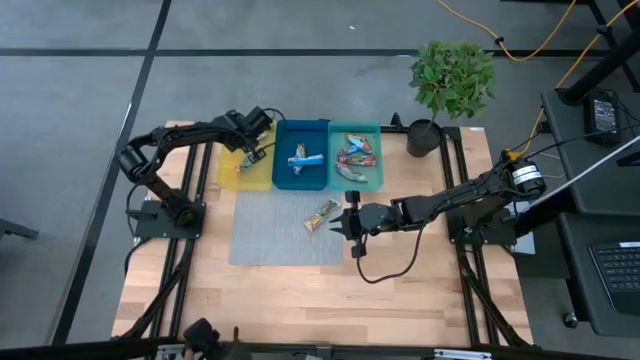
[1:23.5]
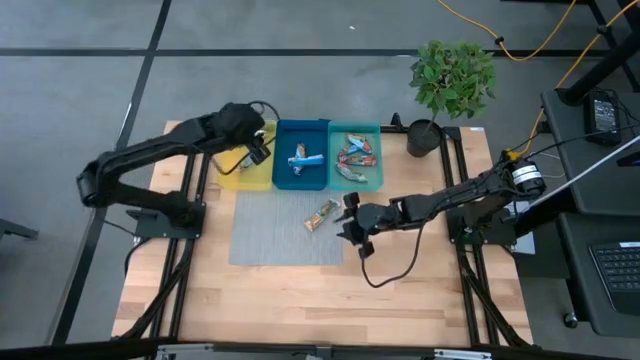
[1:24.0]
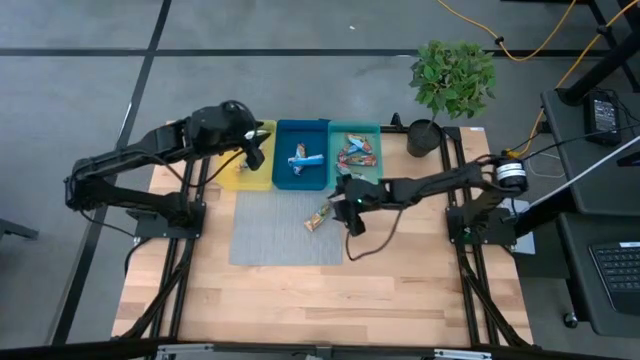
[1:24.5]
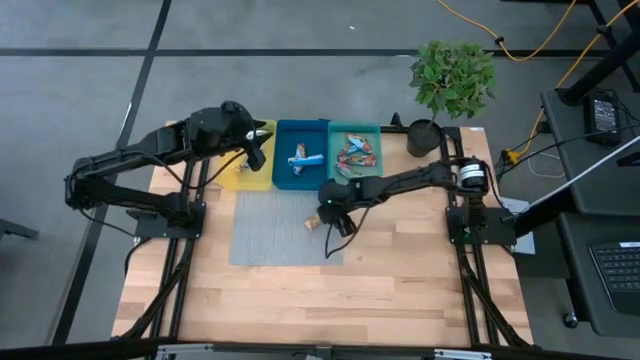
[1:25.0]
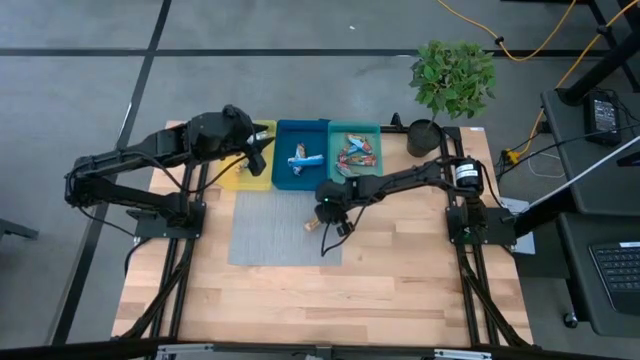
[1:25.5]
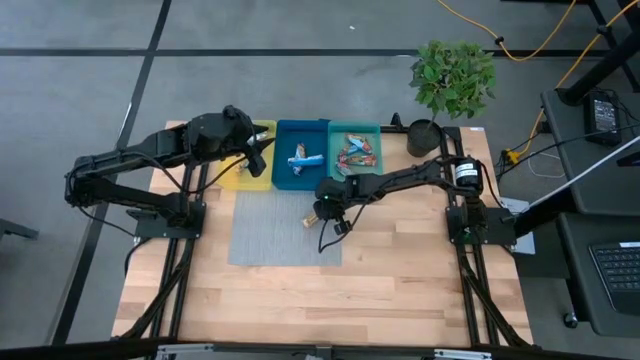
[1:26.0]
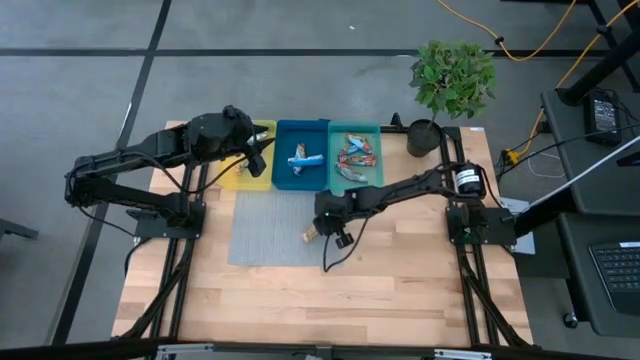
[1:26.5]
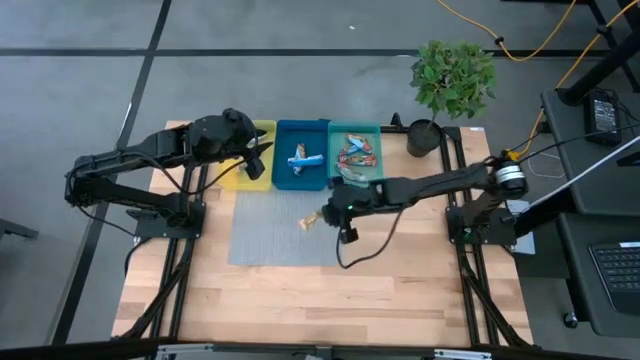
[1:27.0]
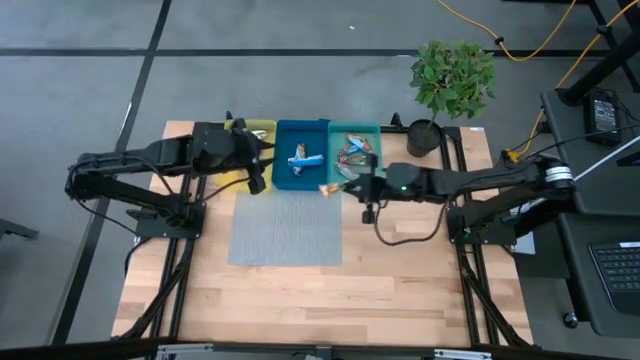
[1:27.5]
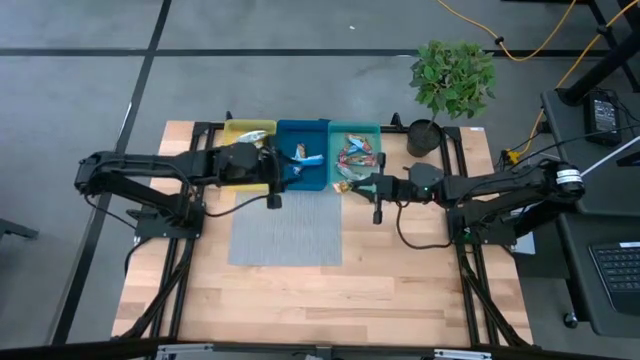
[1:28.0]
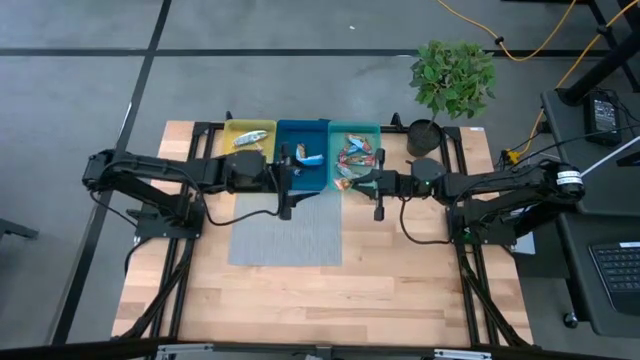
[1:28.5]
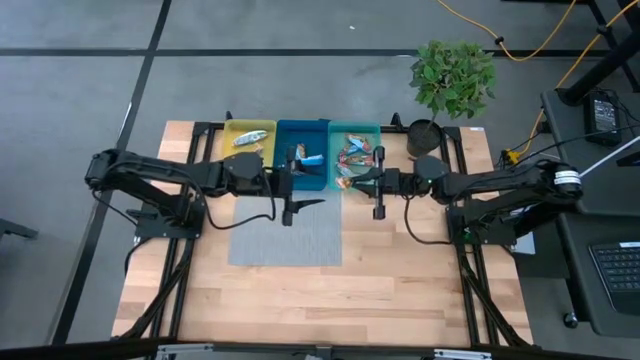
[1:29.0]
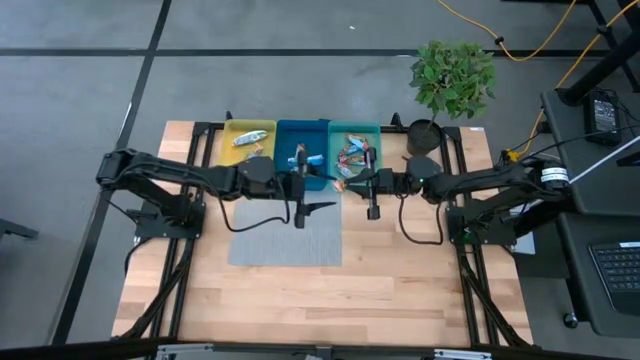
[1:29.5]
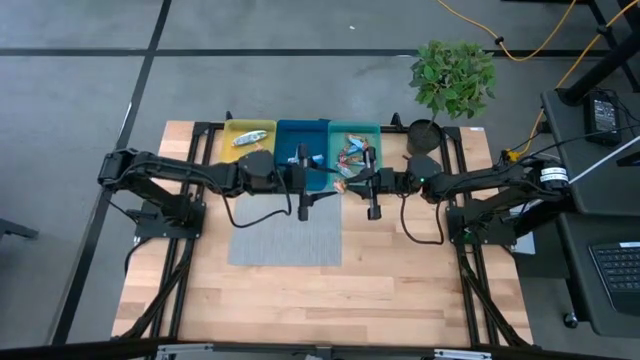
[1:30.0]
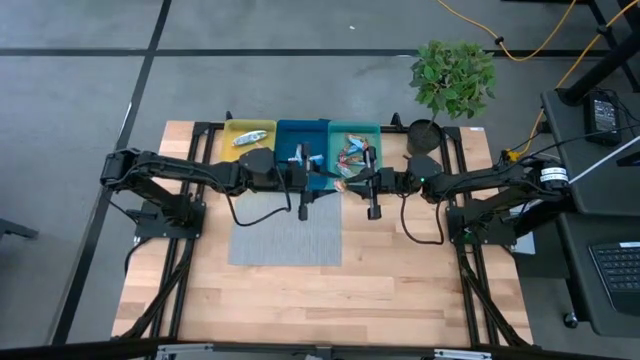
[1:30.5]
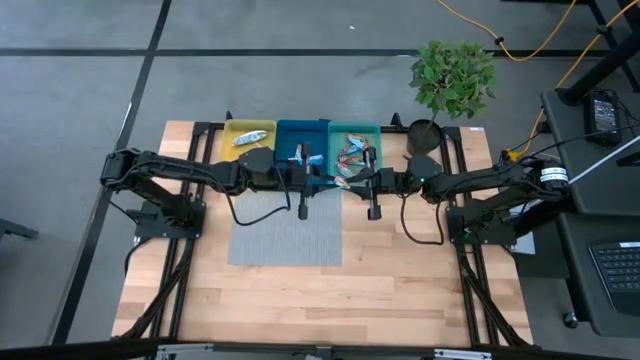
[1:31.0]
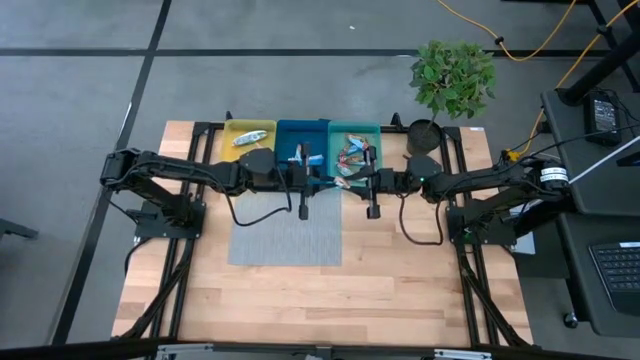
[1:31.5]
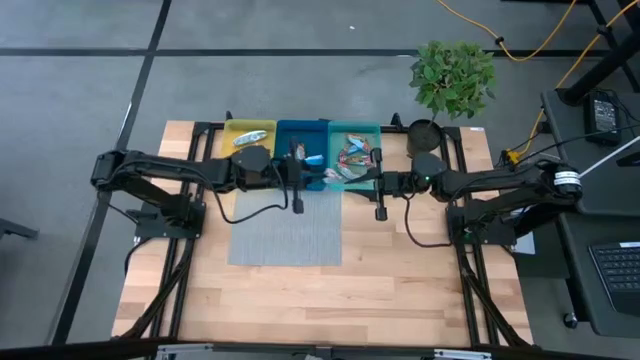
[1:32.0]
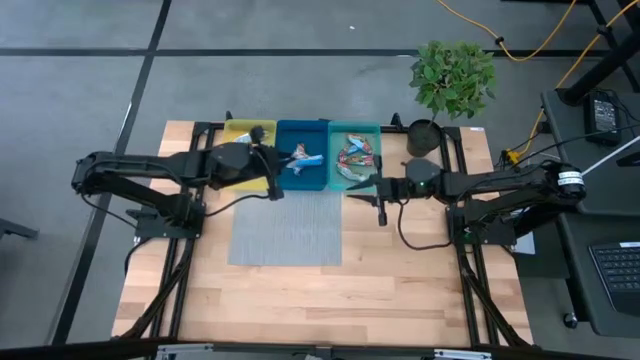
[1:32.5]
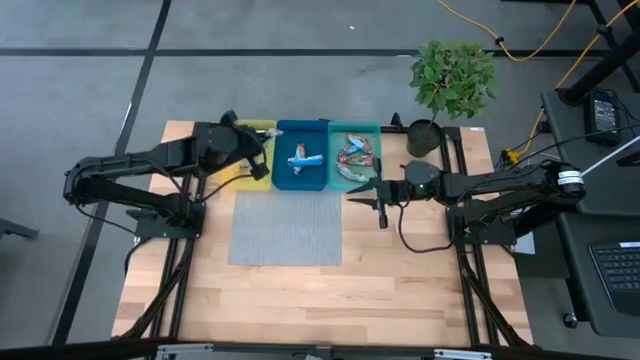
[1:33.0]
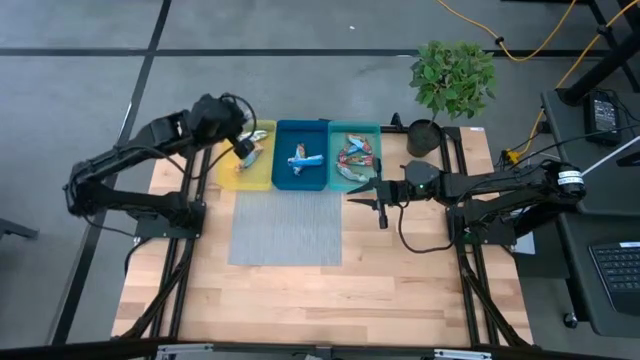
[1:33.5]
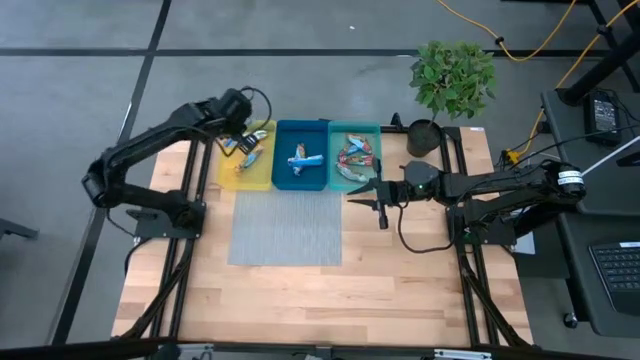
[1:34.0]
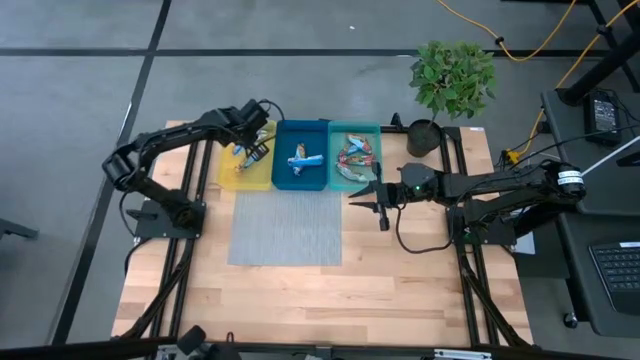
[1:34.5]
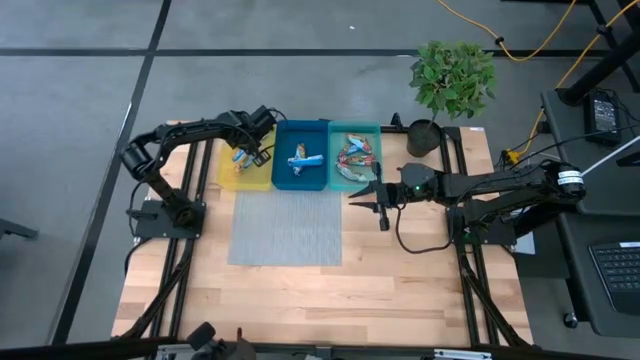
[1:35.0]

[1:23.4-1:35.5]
Task: Pick and place Granola Bars by type
Put the orange granola bar into the yellow bin

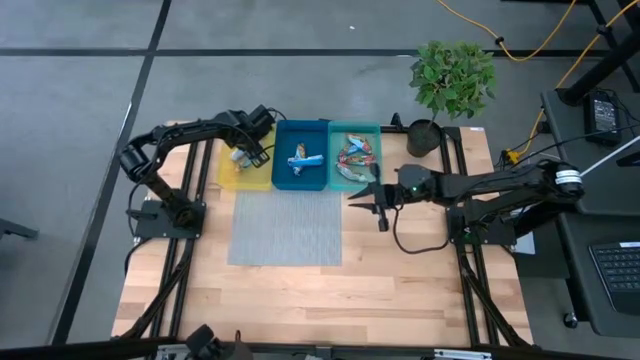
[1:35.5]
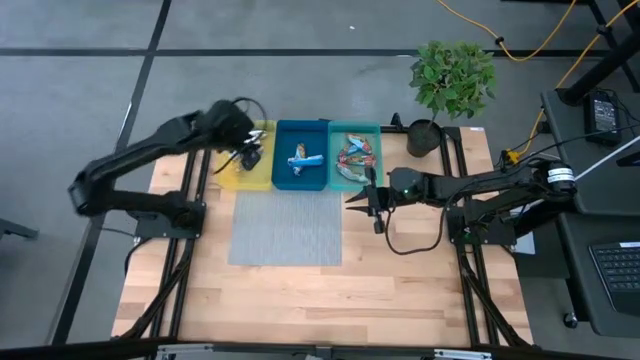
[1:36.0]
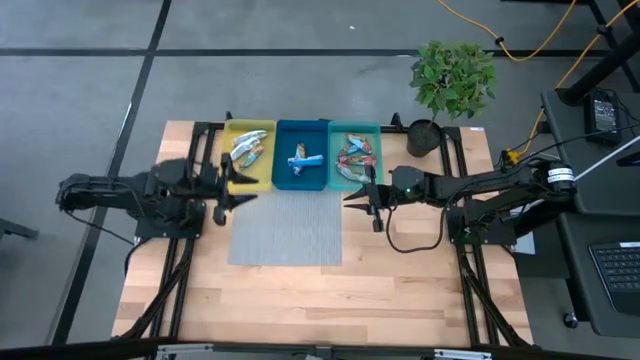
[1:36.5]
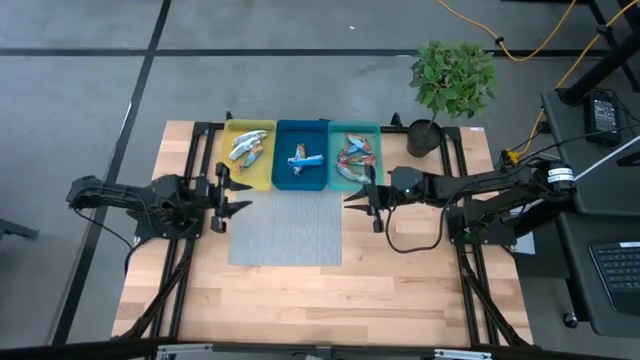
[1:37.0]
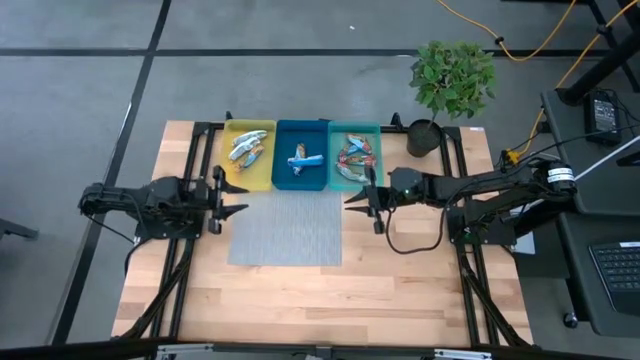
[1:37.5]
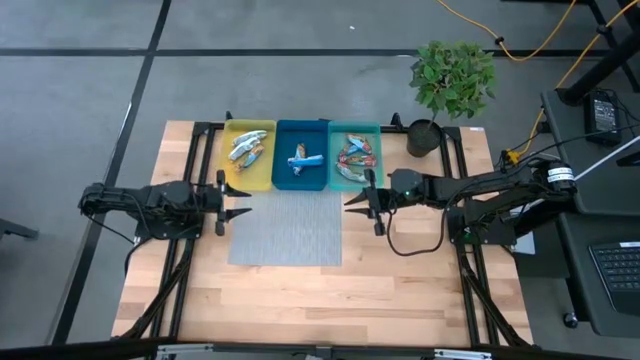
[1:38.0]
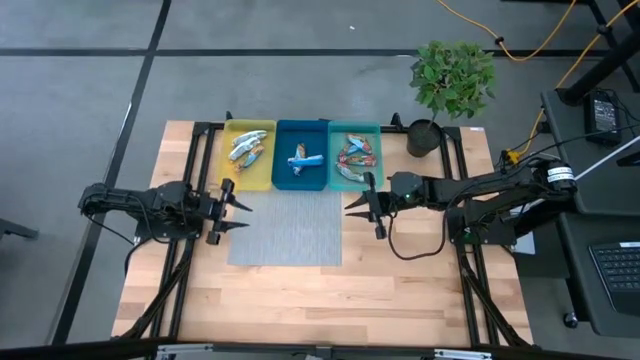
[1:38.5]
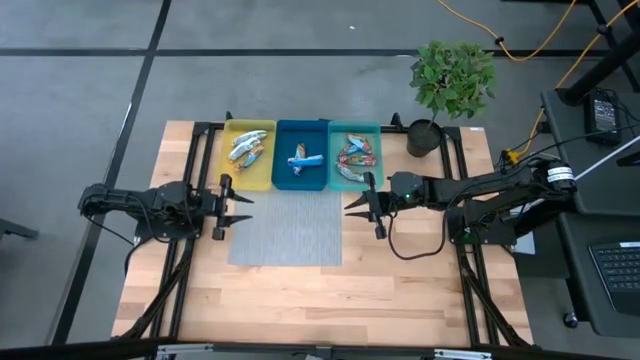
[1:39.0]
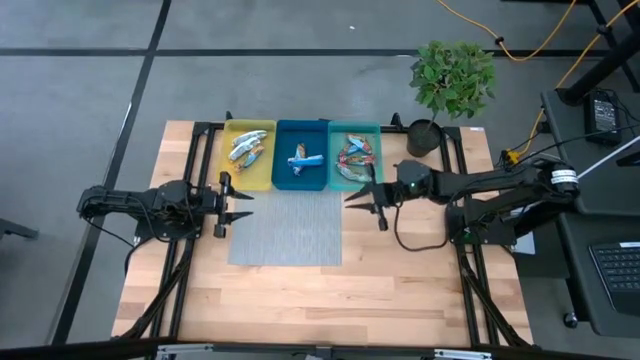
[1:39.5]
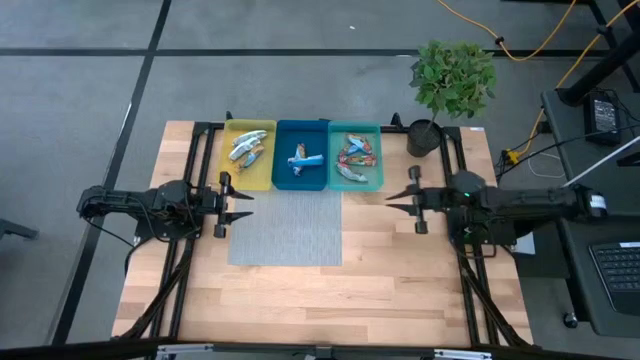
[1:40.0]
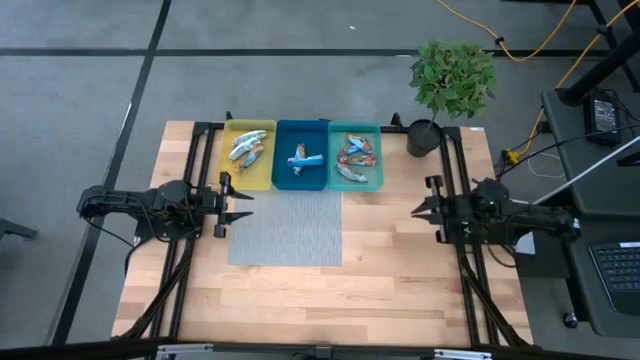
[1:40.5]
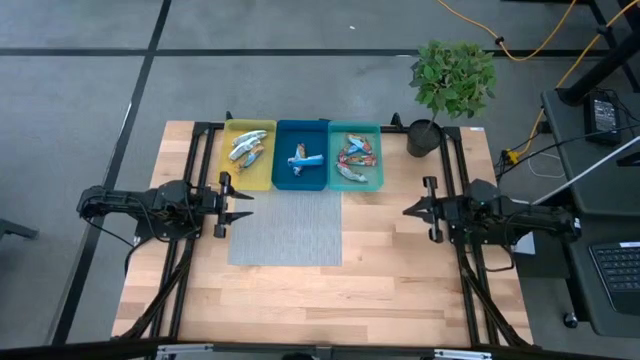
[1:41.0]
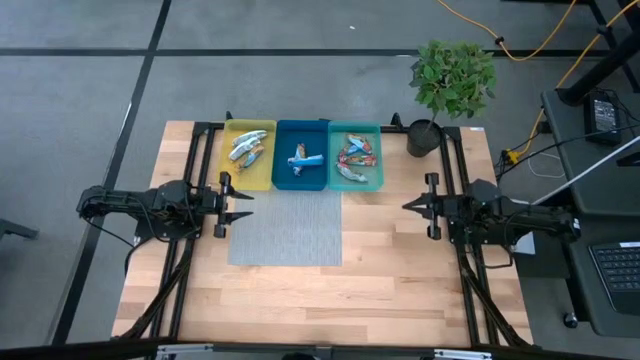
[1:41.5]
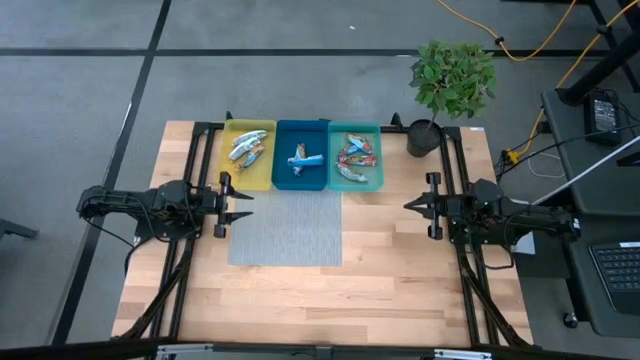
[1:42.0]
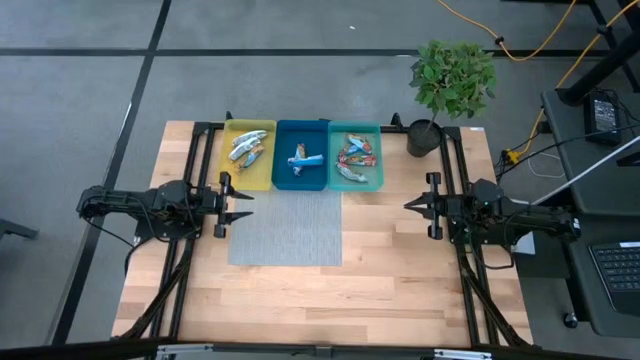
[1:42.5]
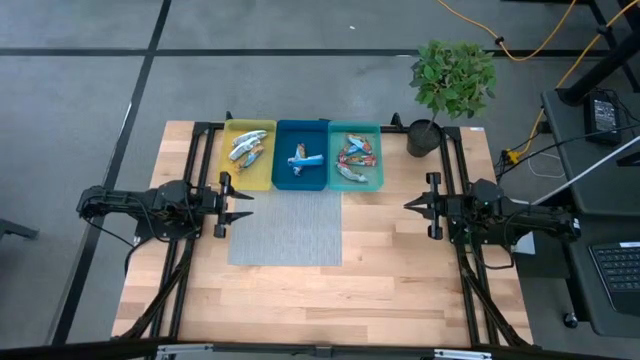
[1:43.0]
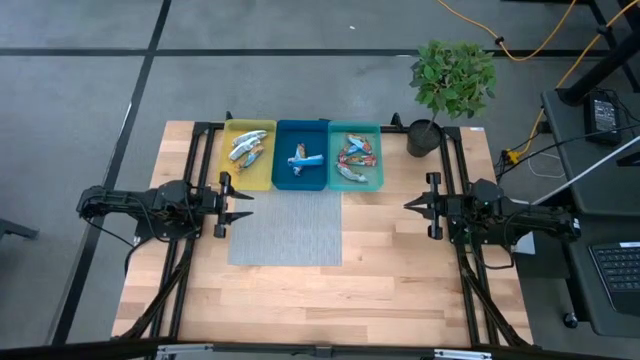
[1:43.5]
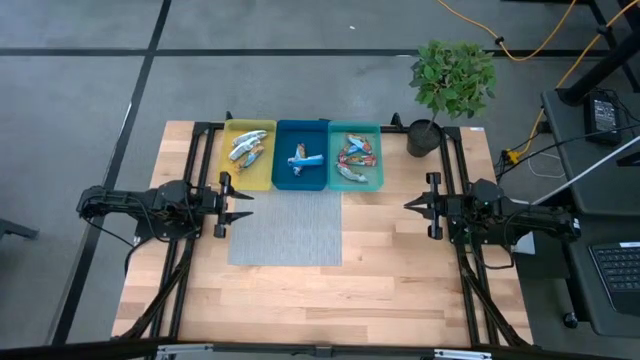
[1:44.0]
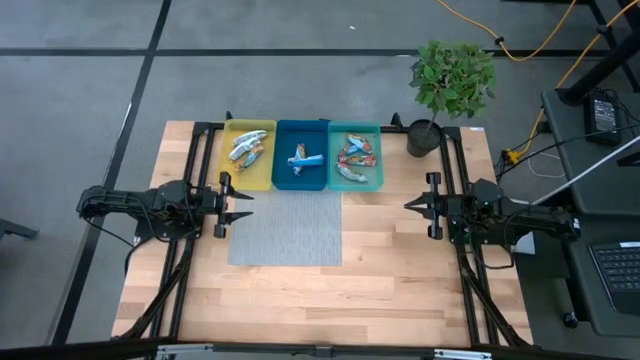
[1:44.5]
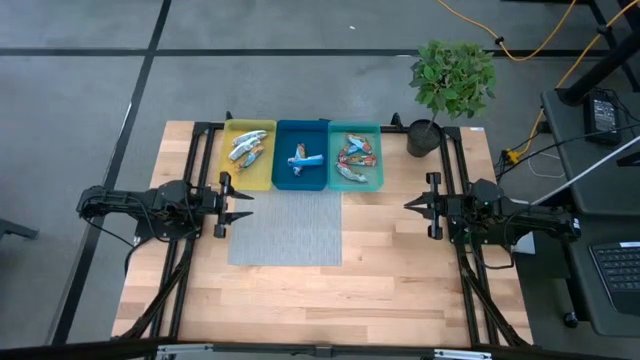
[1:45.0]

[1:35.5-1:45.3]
Return to Home Position
